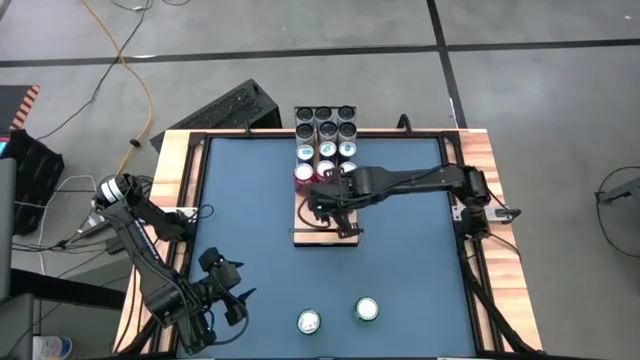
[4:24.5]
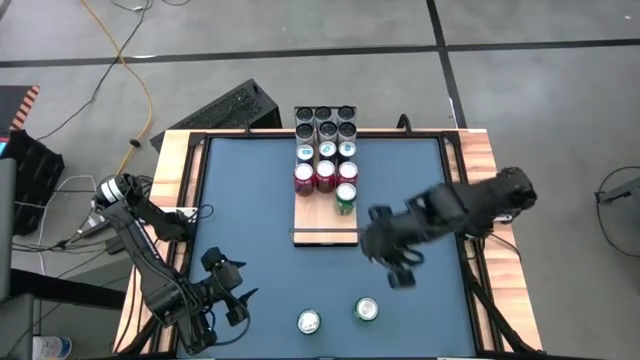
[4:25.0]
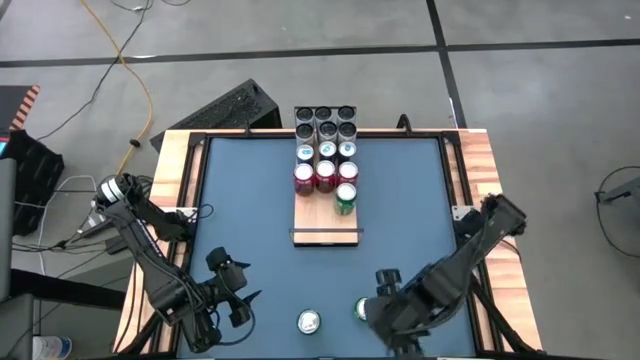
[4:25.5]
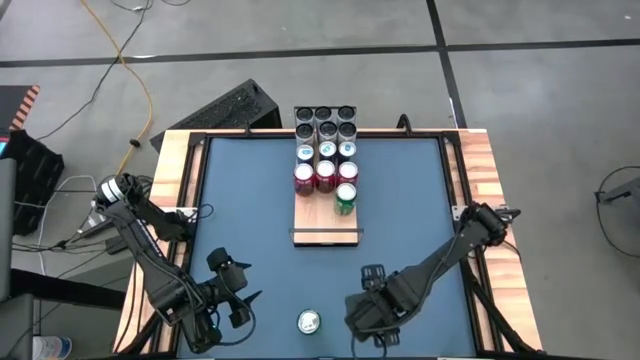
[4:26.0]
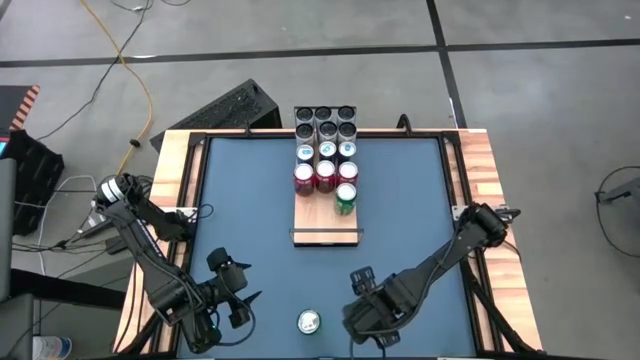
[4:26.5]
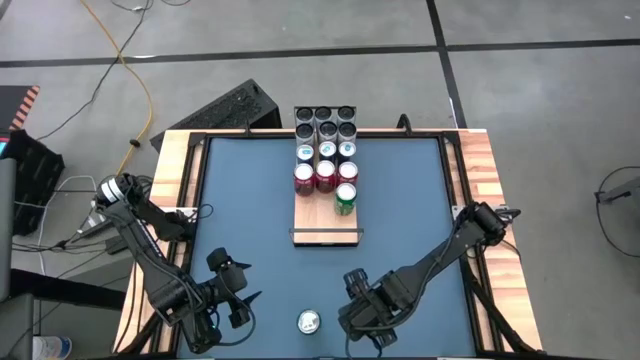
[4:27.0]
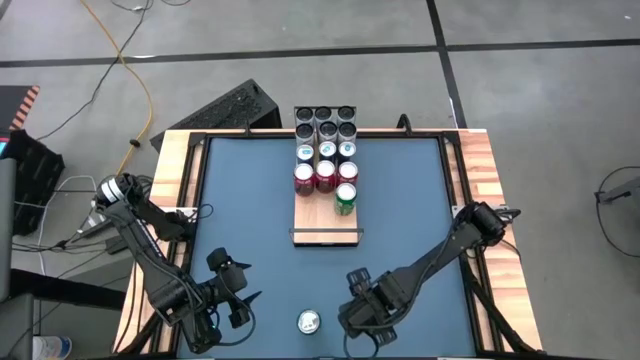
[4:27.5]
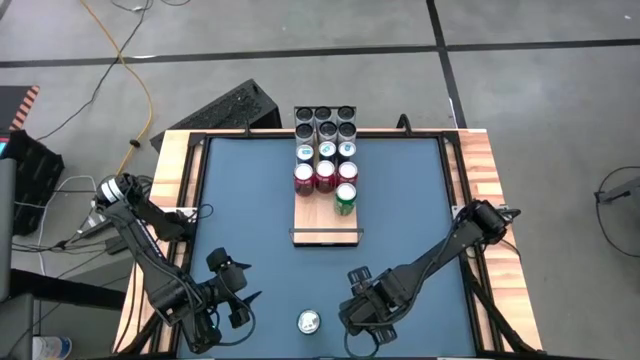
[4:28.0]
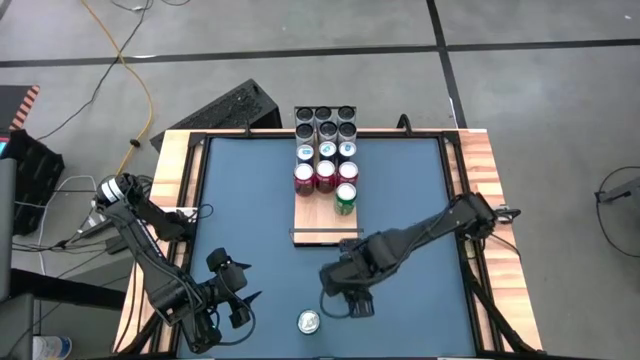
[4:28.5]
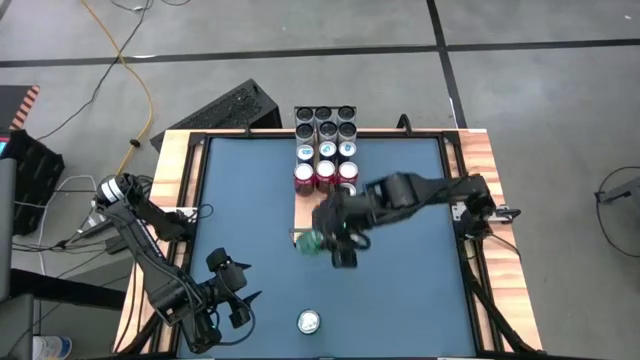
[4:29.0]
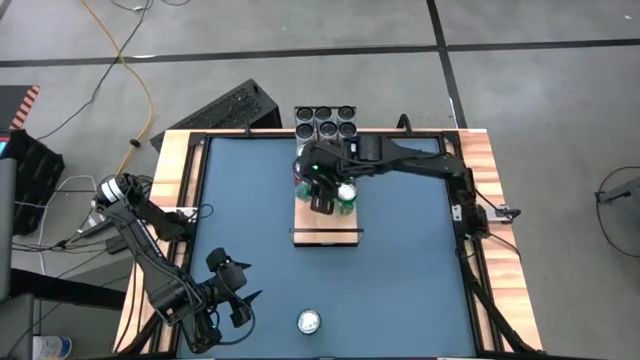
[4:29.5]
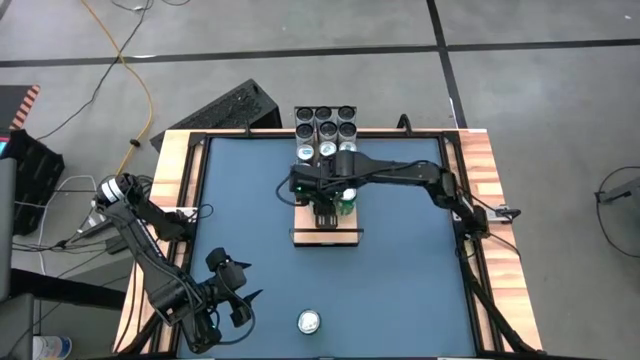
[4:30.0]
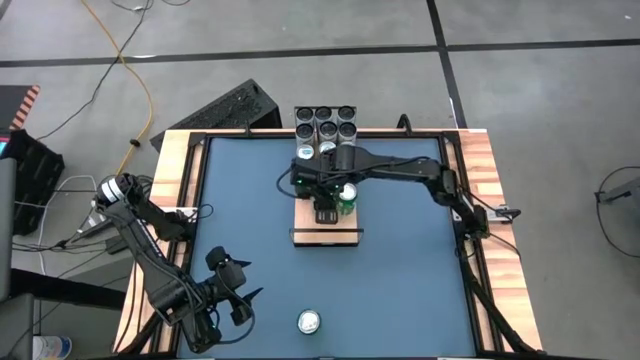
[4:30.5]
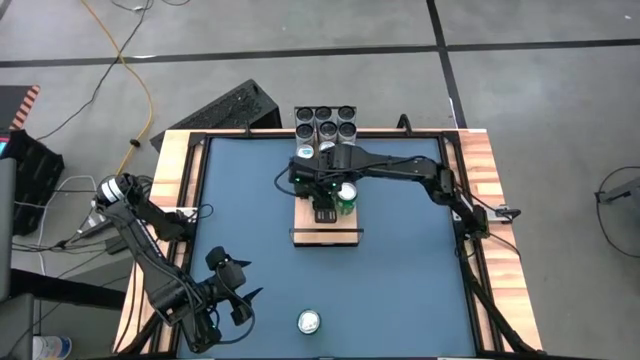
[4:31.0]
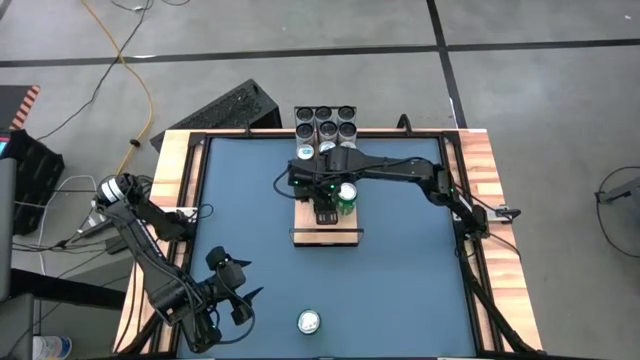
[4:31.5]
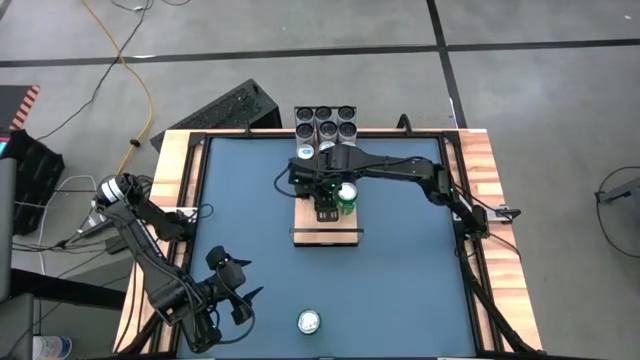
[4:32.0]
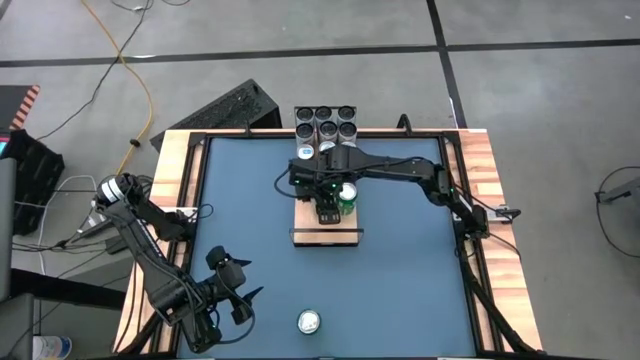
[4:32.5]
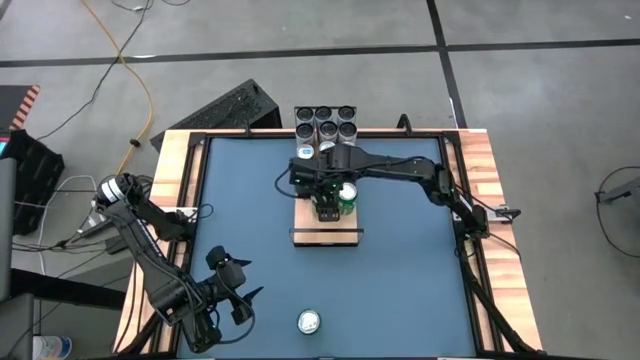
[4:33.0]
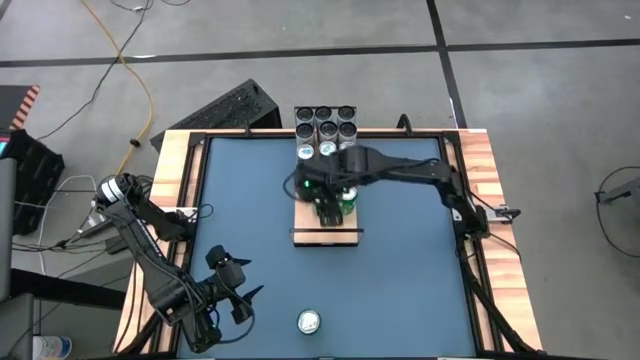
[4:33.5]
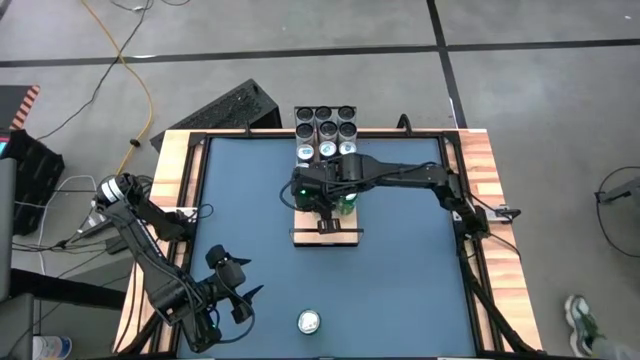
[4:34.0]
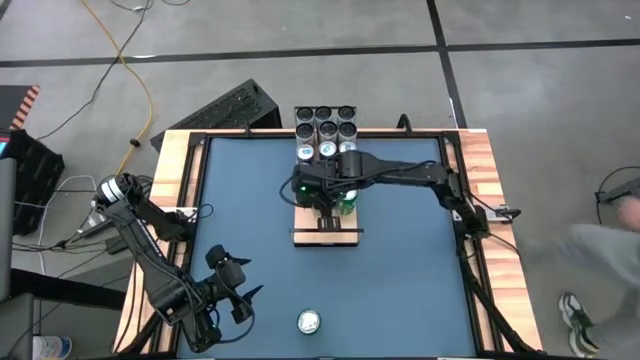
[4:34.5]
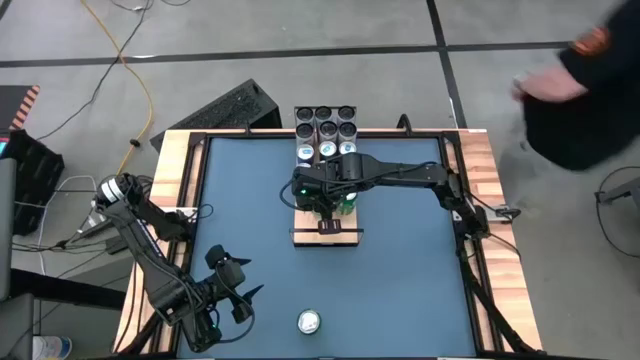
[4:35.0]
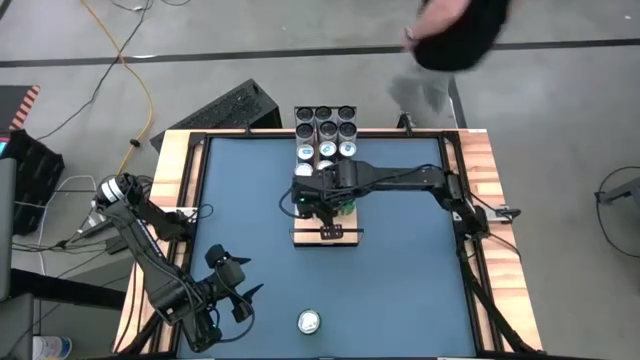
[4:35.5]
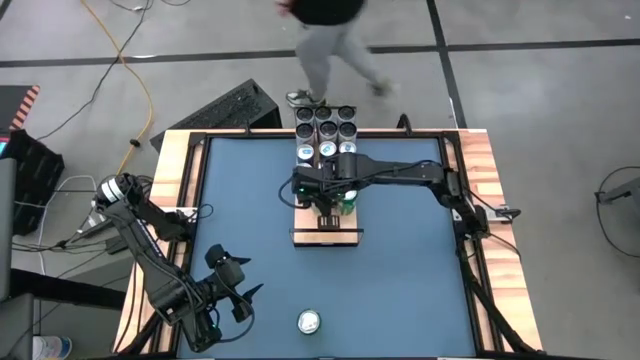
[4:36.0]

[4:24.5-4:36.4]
Task: Place canned beverage on shelf
Put the right green soda can on the shelf aligned with the other green soda can

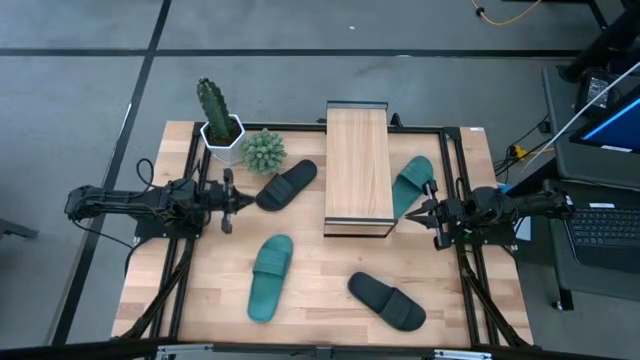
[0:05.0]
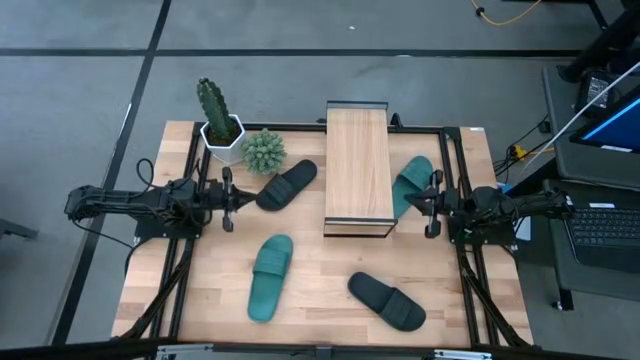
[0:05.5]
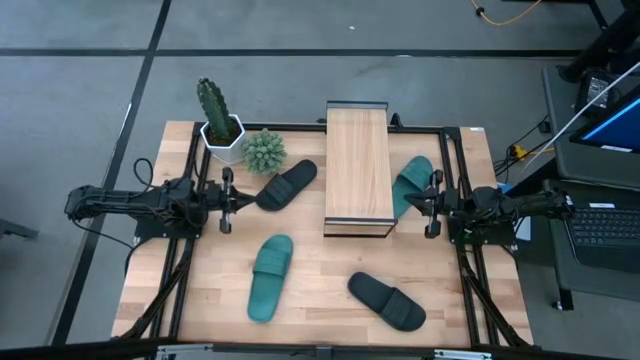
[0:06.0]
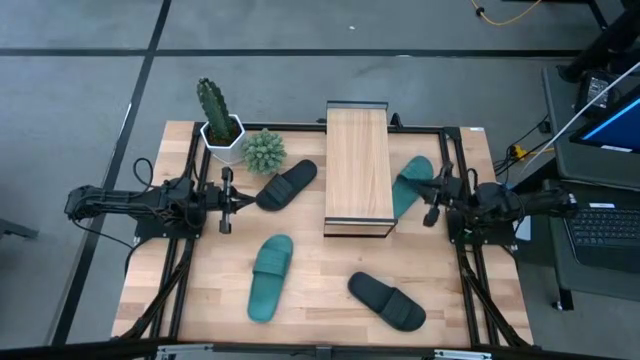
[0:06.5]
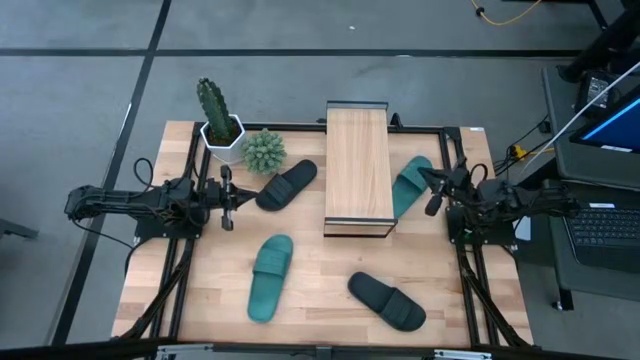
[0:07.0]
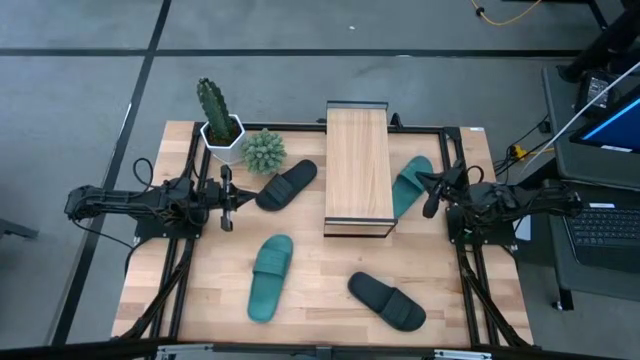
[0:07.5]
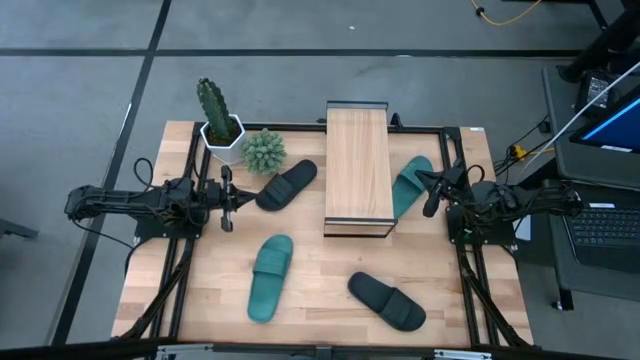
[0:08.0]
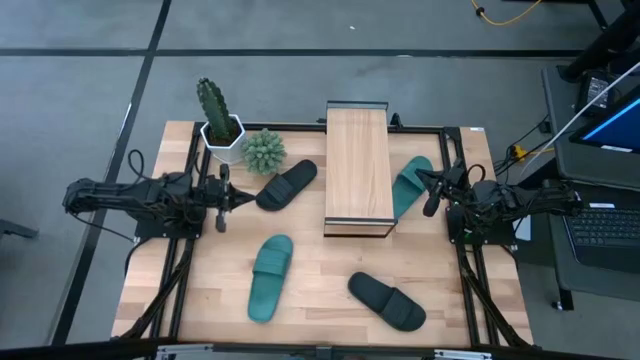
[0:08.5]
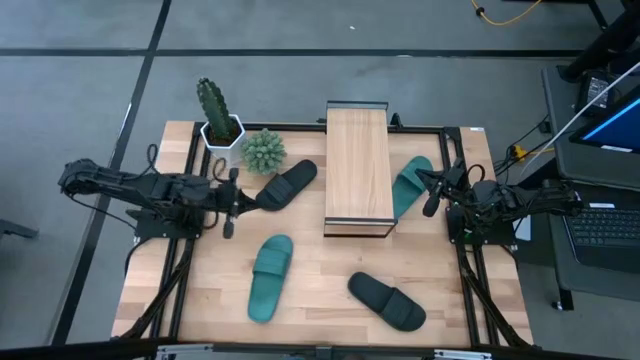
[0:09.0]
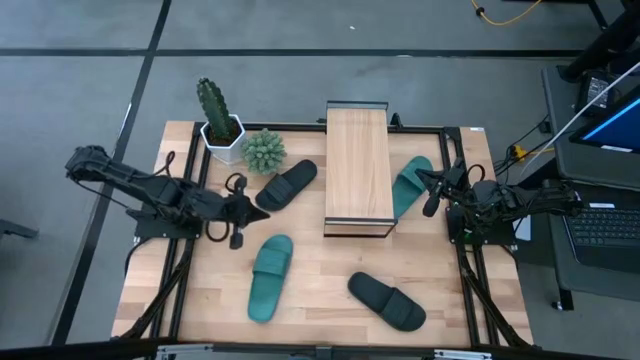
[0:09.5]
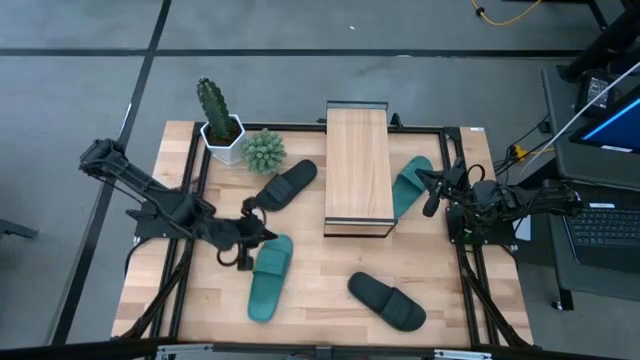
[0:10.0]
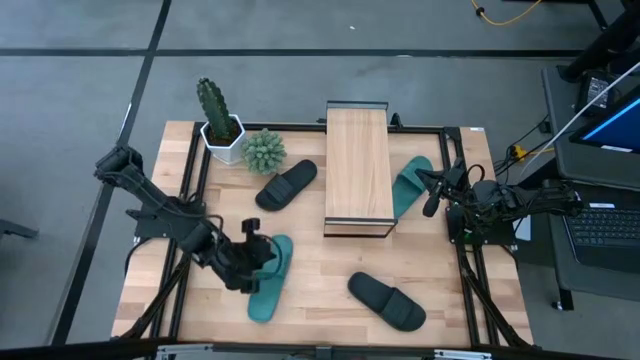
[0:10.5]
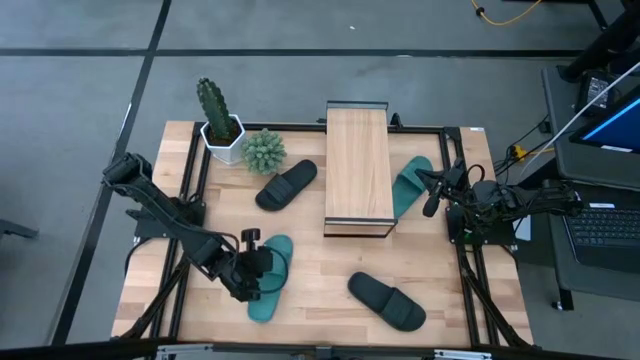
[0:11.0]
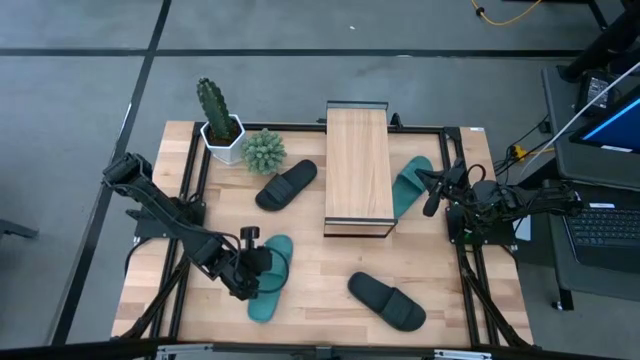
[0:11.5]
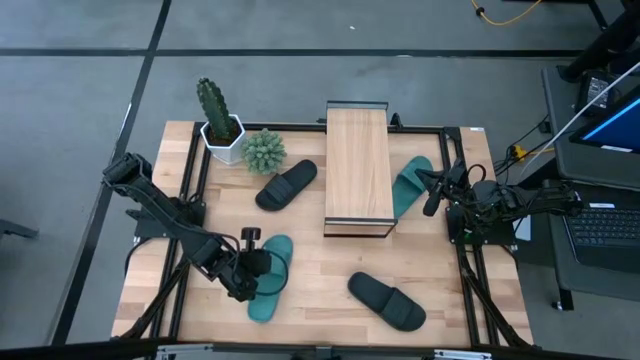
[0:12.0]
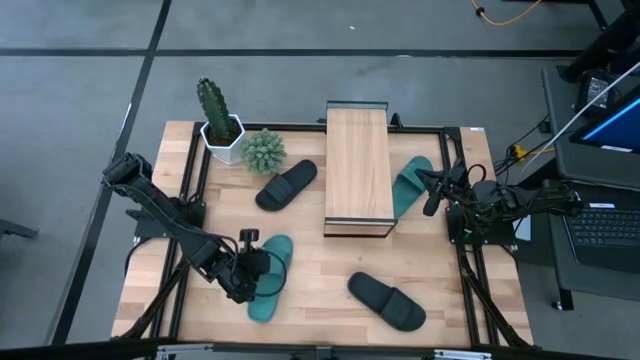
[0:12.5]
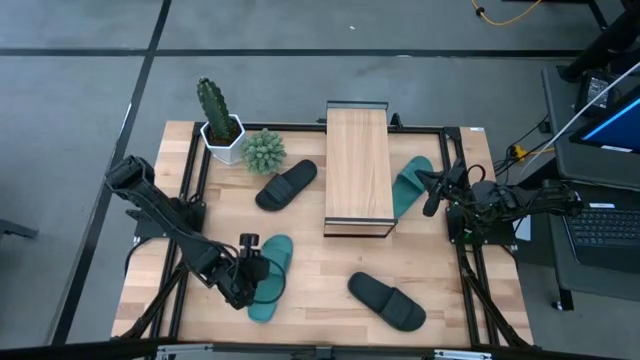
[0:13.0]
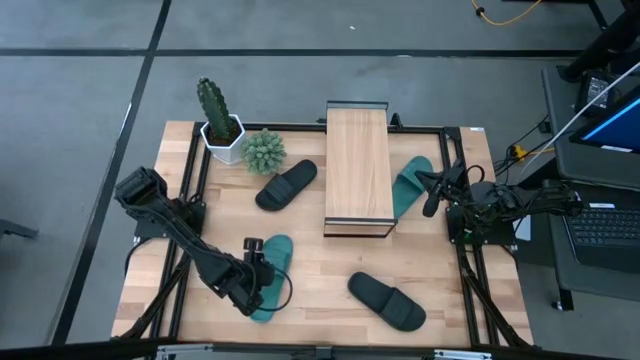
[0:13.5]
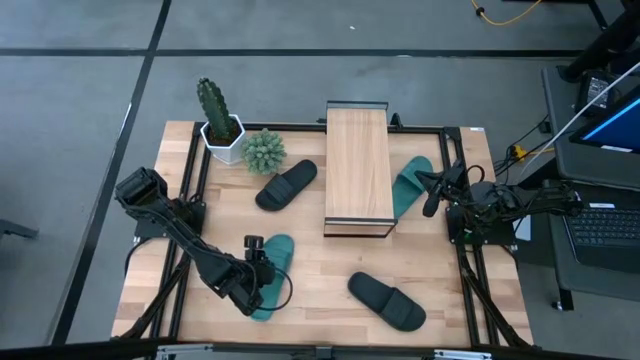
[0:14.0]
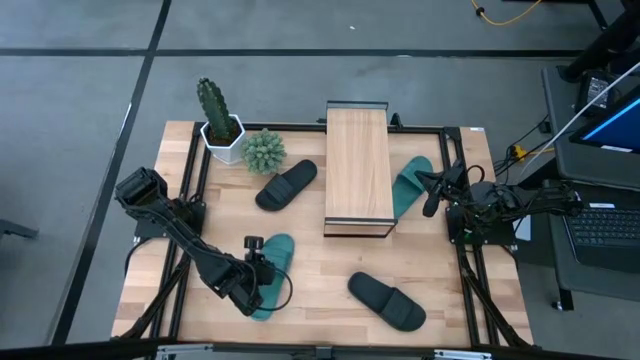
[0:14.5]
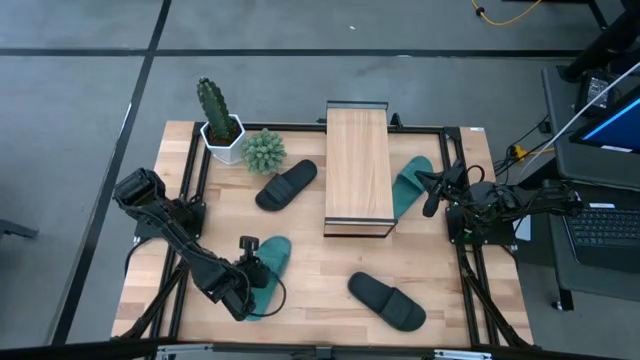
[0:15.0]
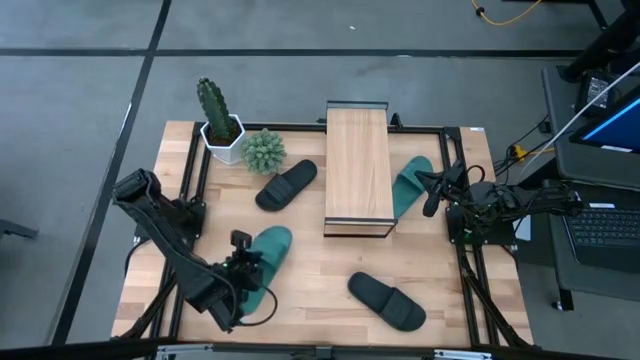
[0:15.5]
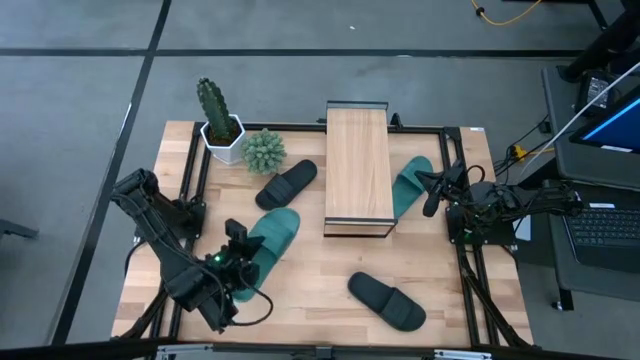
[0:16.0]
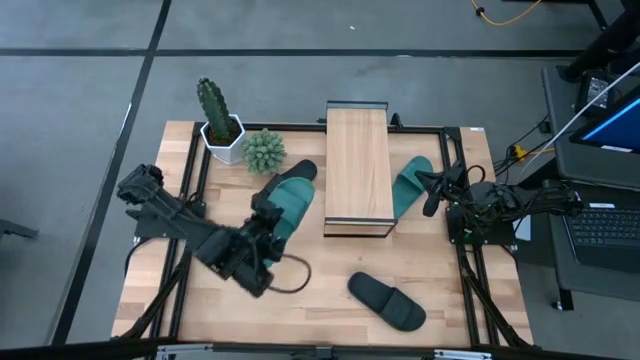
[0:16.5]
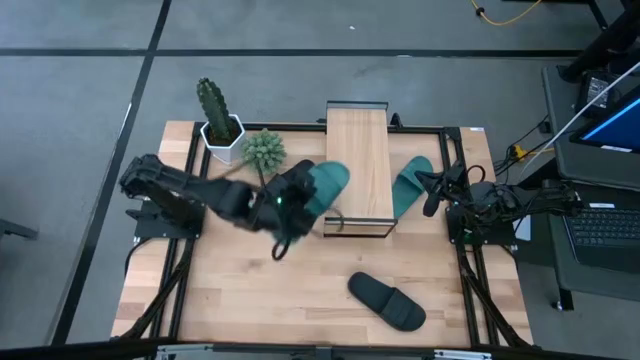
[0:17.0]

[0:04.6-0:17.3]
Task: Pick and place slides into the shelf
Put the bottom green slide on the shelf
